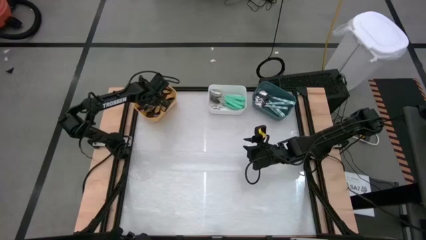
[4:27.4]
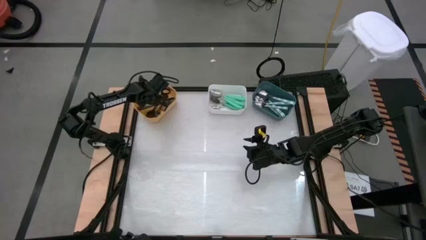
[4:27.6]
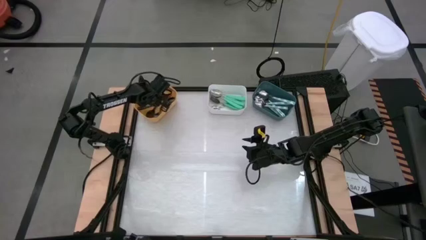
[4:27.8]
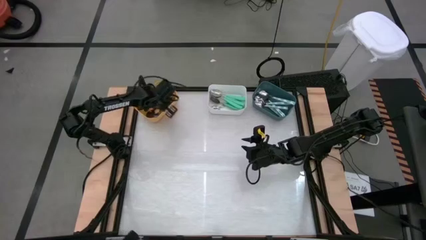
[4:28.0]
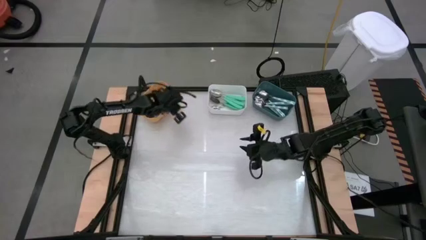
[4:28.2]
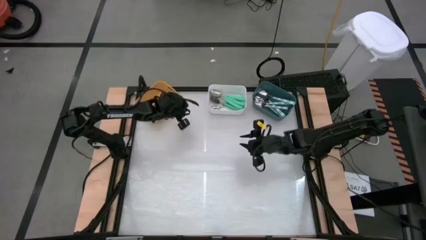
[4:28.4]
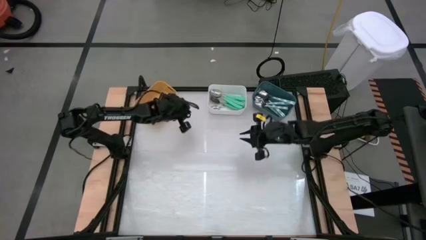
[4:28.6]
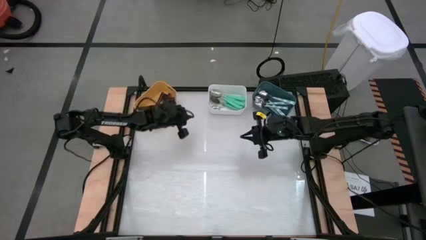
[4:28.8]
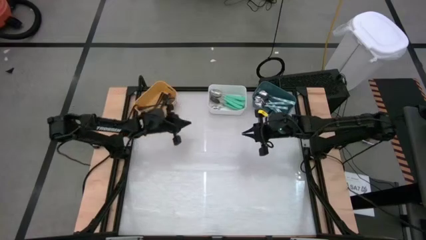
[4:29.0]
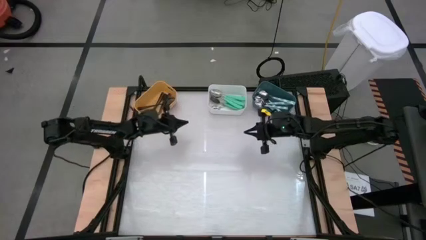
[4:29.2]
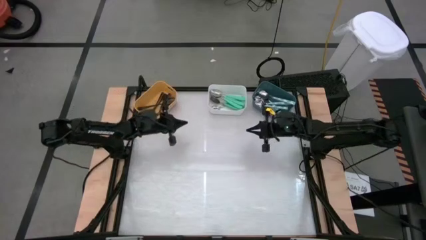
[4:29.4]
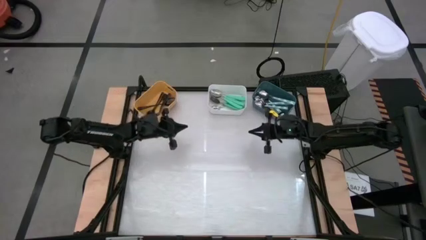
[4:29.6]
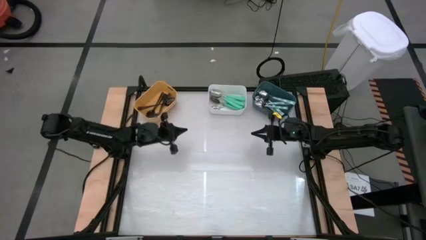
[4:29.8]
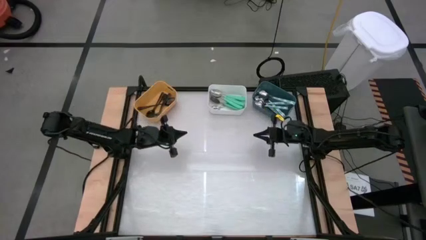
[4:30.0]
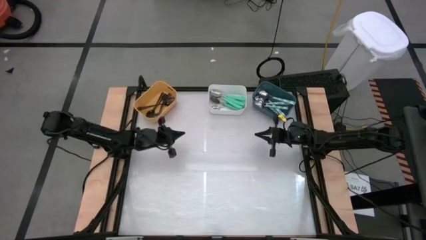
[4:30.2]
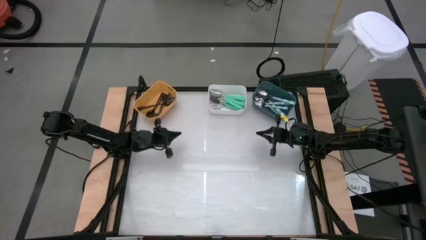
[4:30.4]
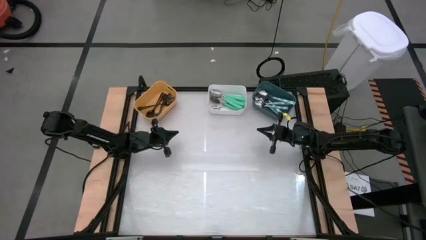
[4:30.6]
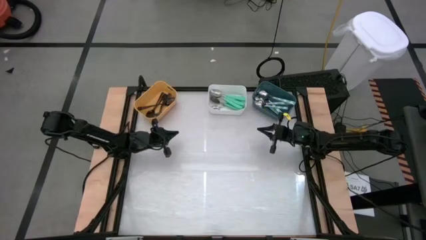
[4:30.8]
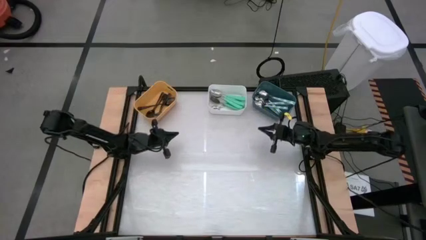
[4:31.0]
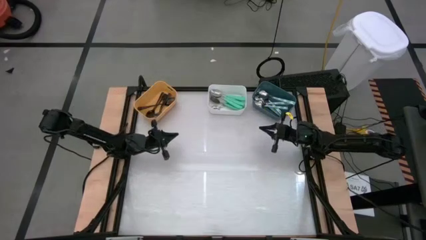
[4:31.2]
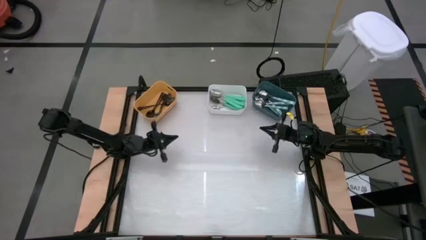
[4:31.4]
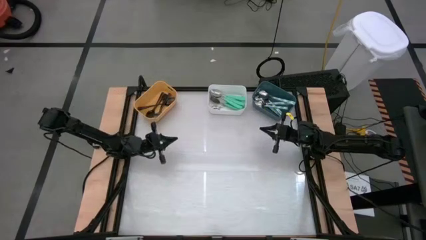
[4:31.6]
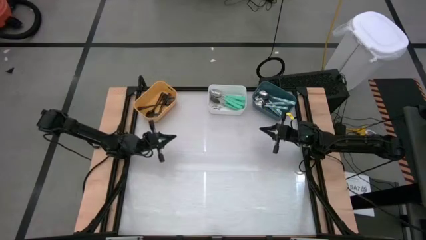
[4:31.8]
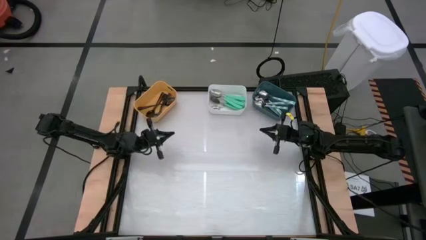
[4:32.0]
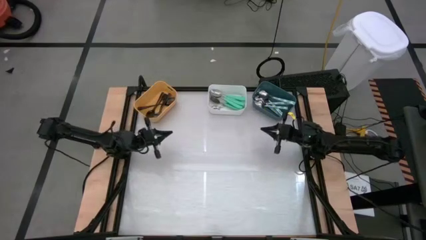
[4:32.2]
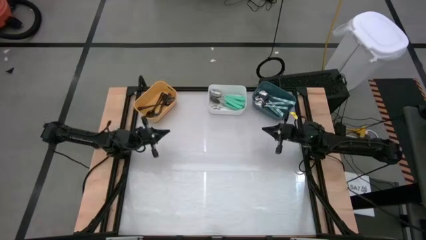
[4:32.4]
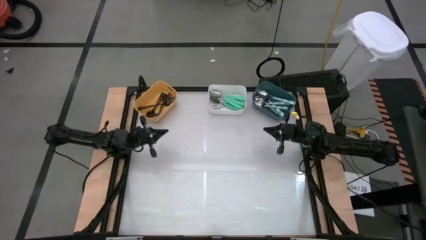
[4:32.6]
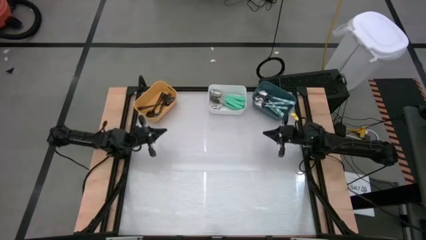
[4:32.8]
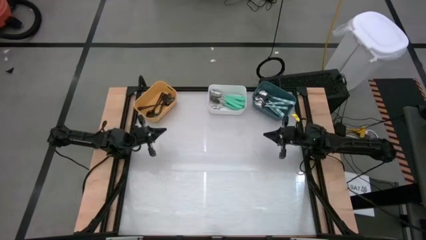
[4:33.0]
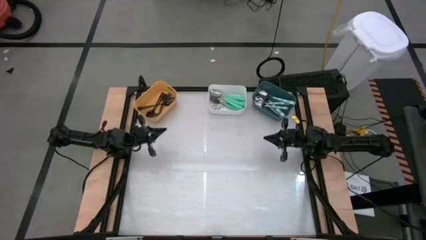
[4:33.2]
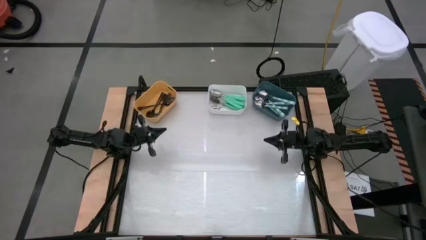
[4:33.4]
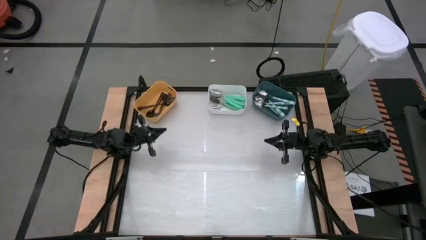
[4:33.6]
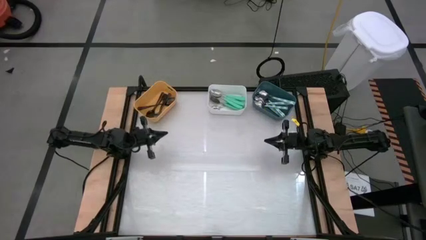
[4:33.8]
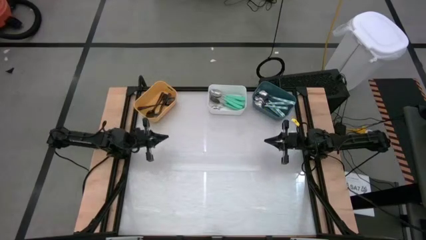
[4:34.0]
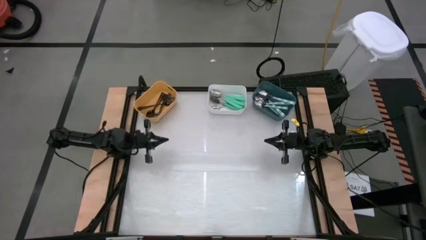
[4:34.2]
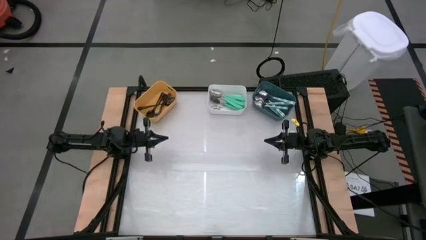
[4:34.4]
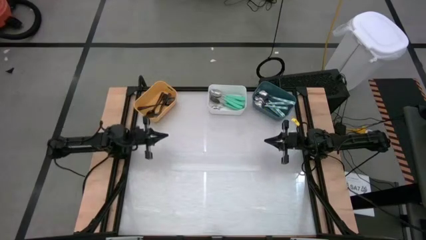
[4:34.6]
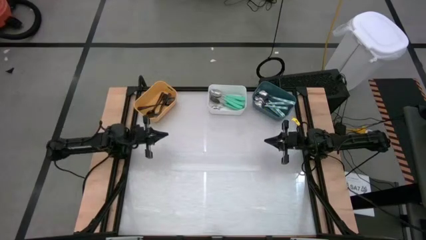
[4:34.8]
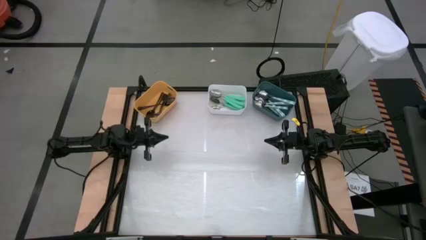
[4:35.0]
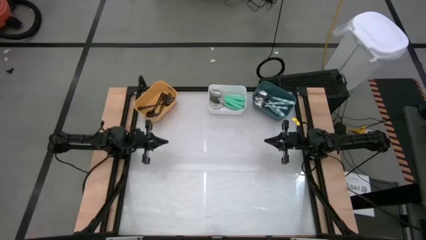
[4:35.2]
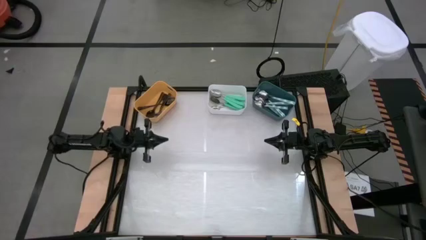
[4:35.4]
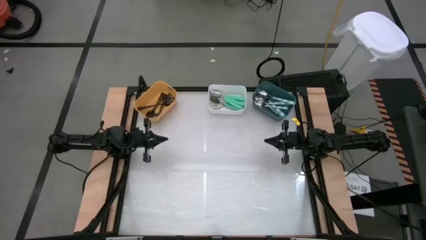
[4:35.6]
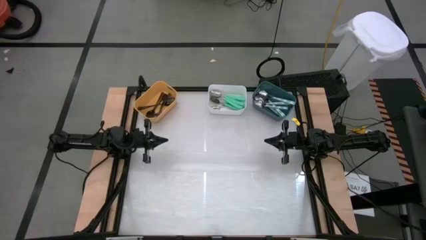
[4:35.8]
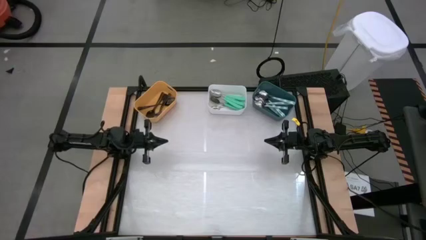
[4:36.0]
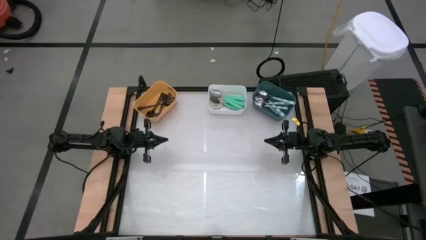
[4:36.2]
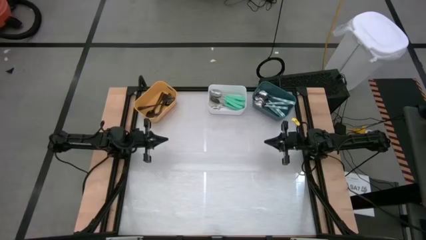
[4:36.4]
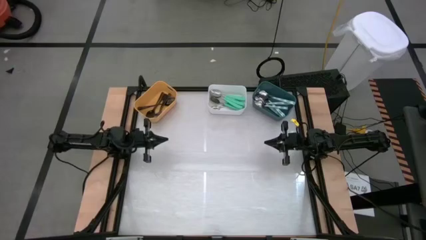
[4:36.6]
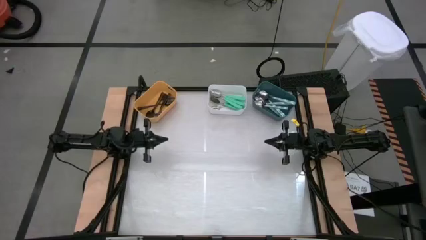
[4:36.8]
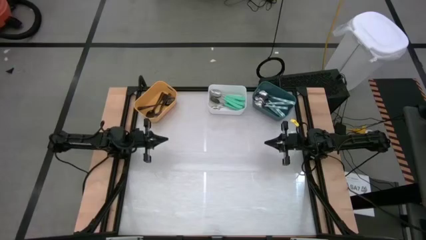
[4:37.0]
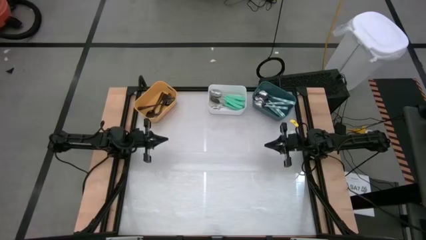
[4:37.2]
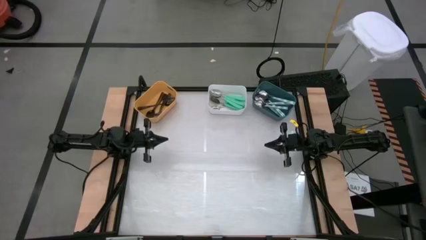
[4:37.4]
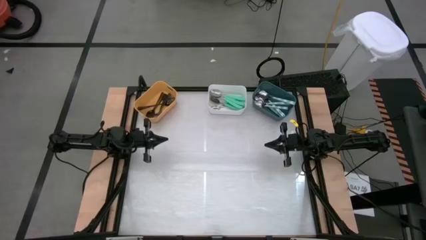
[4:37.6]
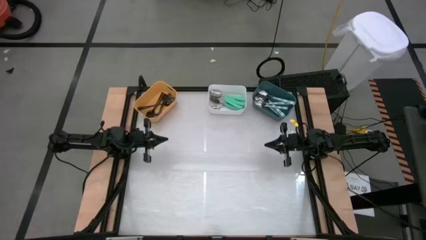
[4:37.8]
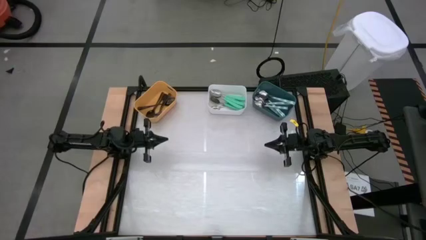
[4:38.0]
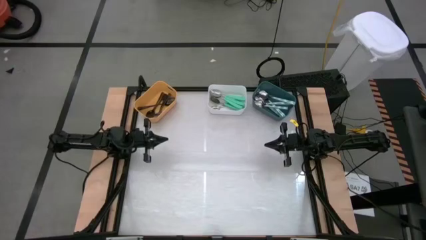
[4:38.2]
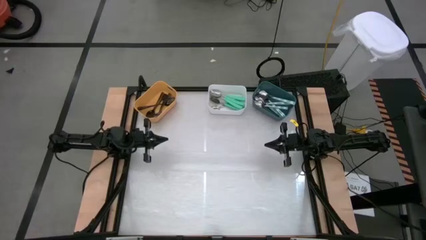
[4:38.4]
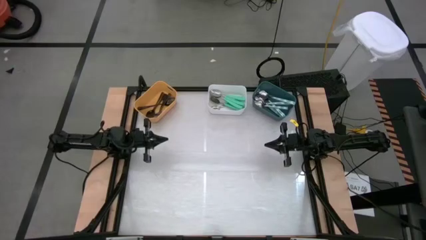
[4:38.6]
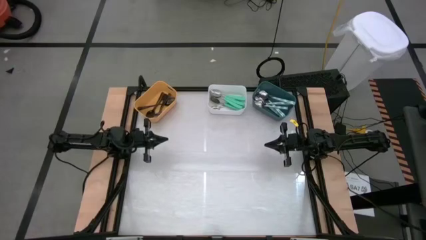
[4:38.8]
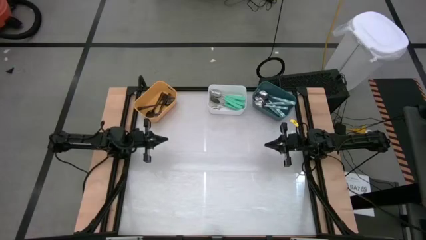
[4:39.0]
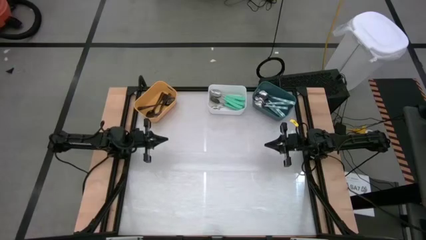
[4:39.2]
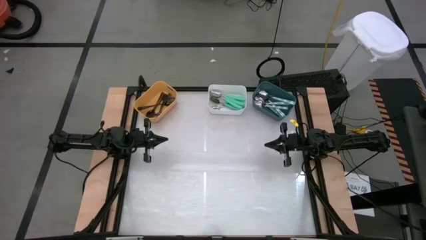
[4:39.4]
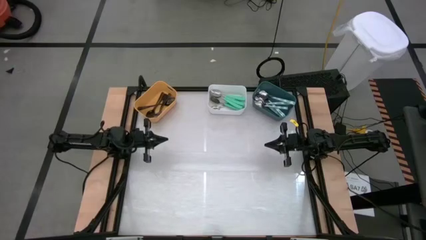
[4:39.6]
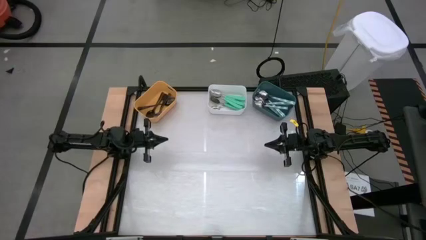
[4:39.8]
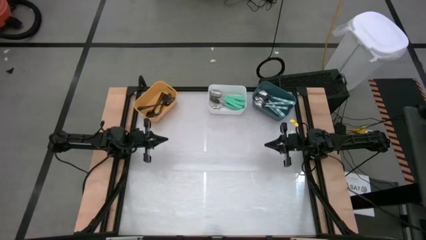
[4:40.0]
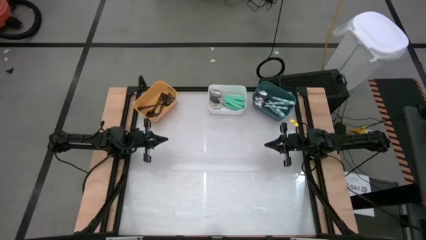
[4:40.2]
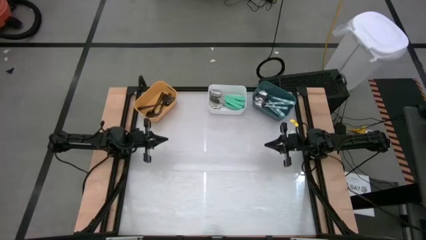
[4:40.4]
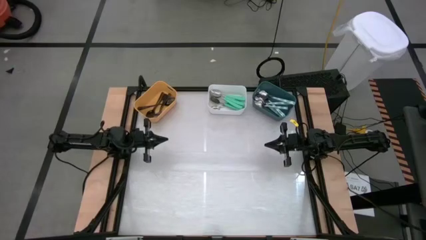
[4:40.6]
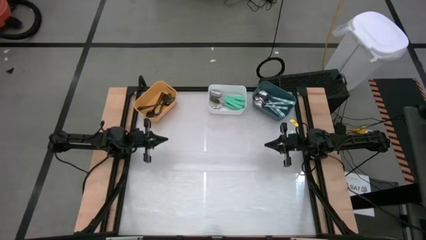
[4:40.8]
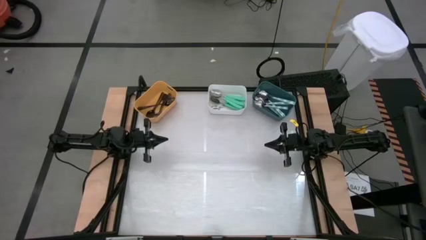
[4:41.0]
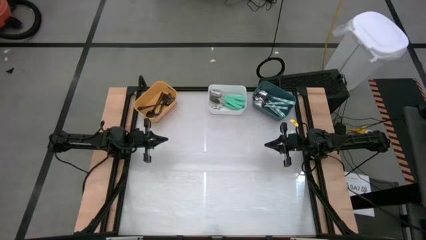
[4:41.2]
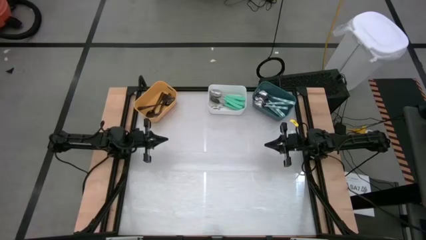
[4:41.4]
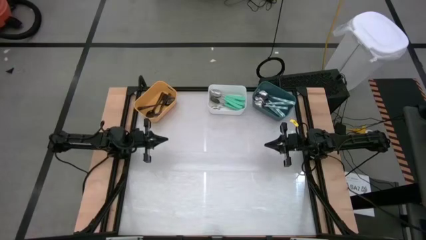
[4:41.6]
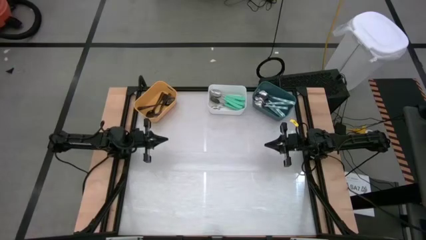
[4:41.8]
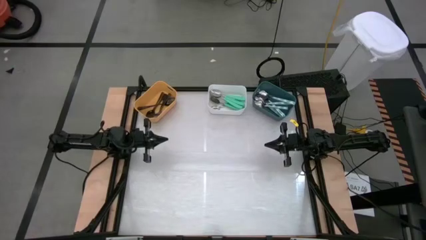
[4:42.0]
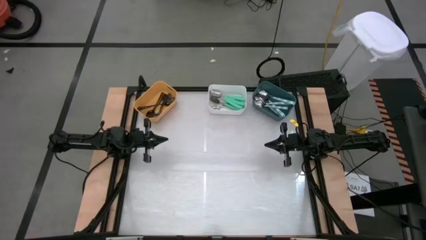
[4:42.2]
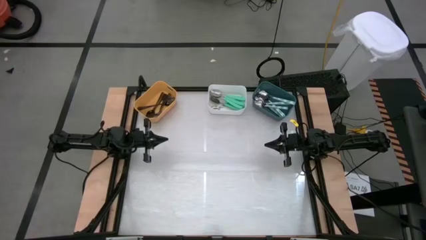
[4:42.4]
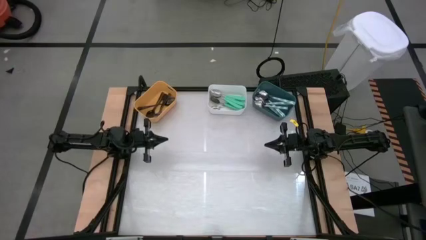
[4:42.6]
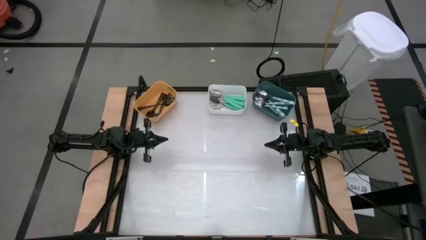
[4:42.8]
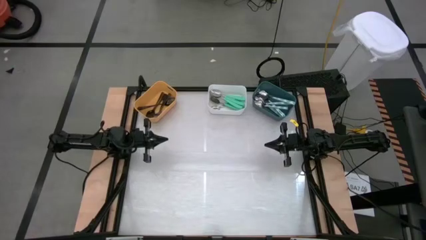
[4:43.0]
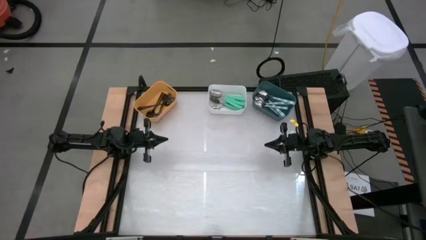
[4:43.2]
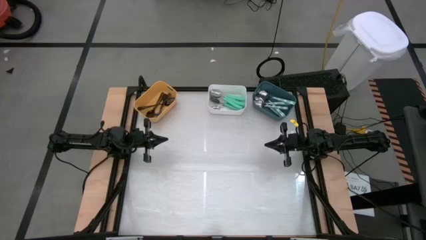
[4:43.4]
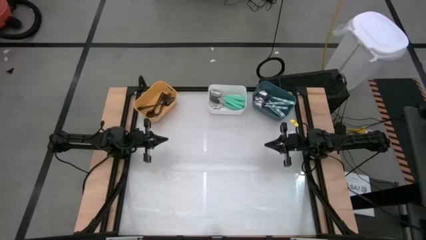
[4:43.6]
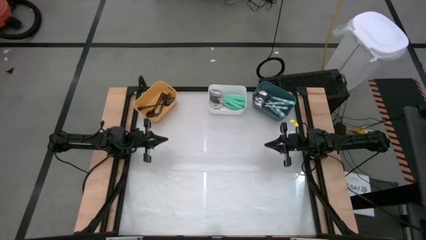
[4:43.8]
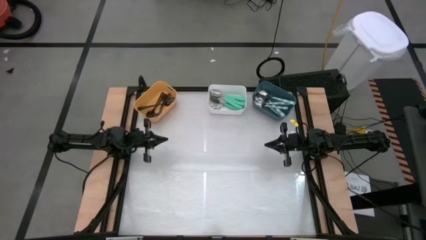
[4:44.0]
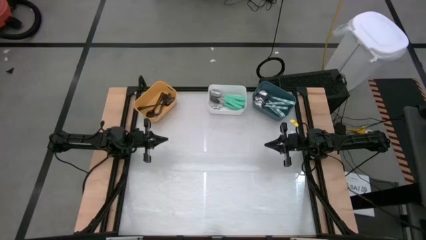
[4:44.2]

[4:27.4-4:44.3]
Task: Sort silverware by color (type)
Return to Home Position
